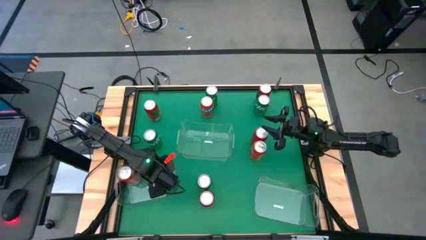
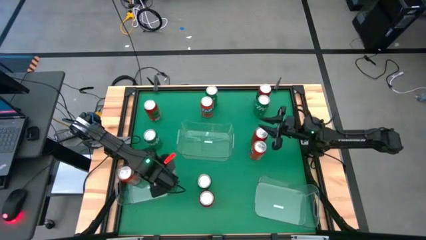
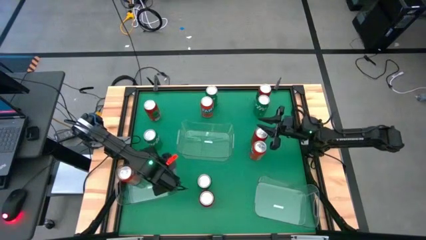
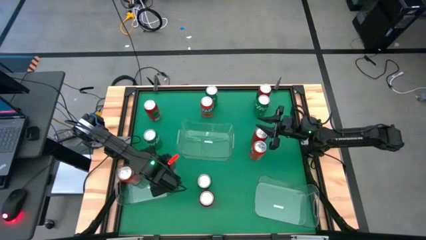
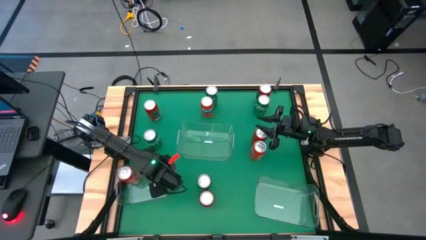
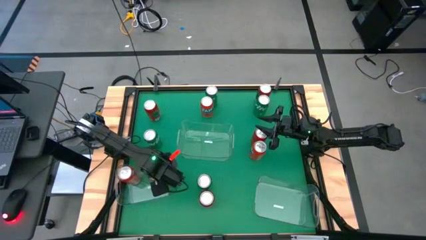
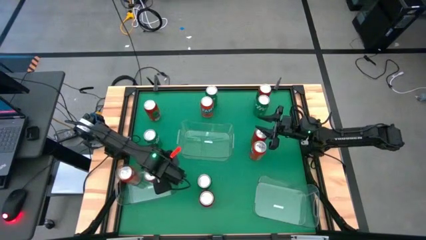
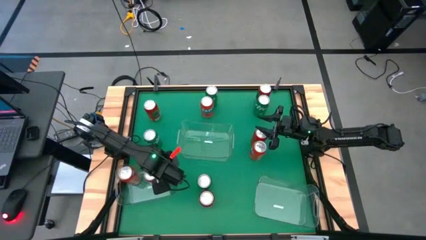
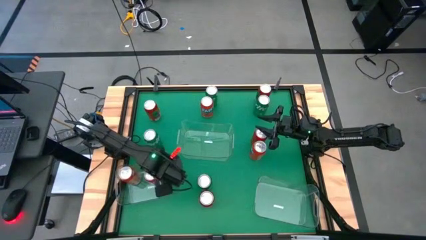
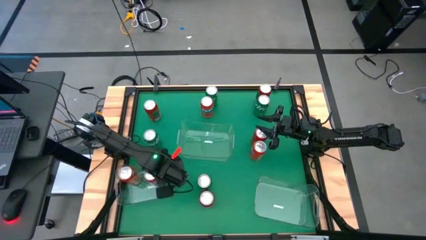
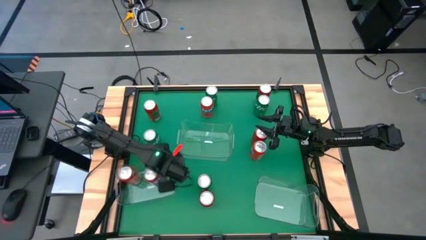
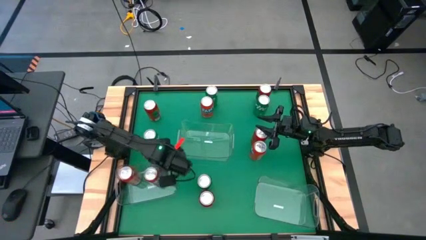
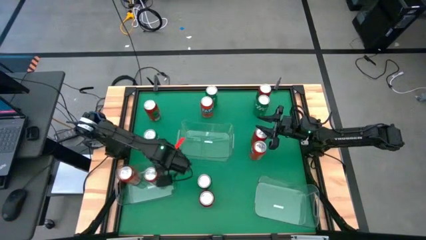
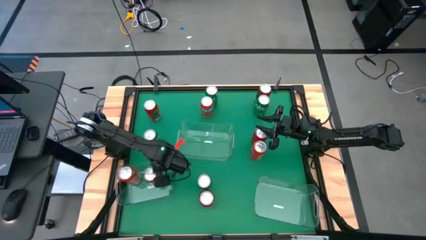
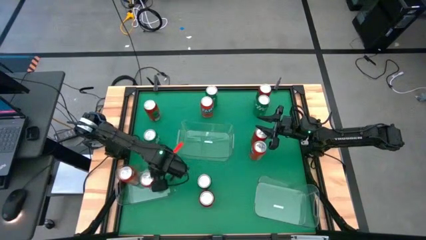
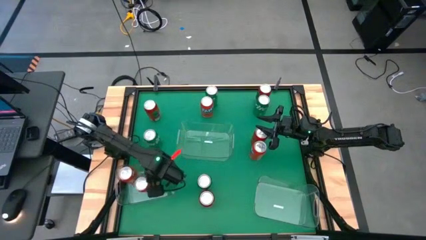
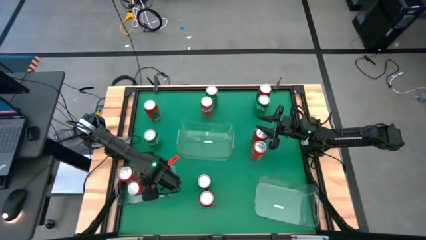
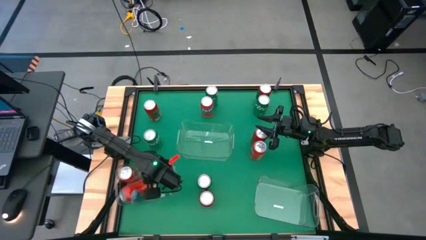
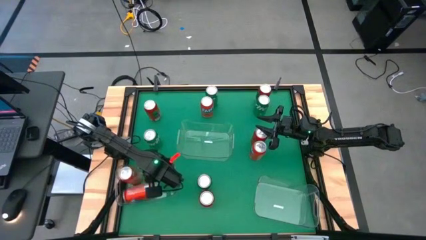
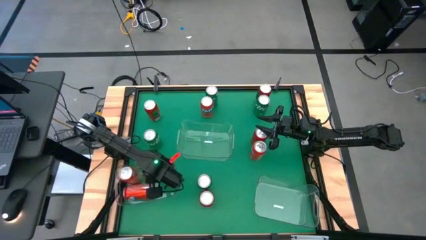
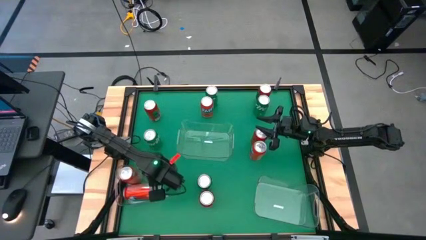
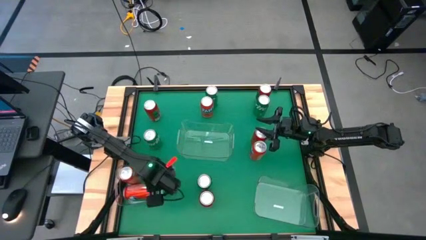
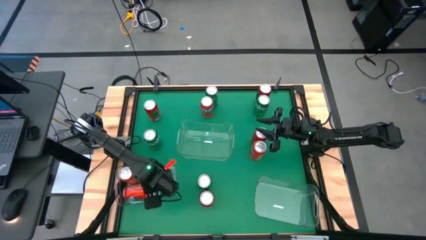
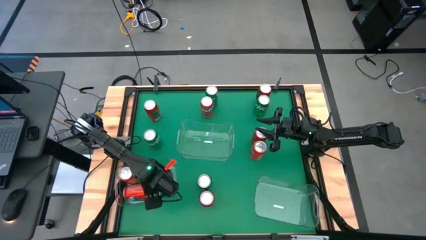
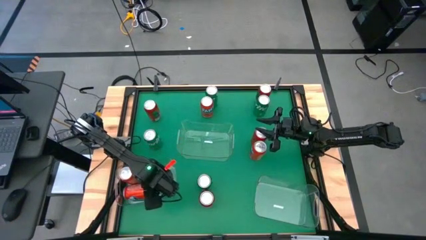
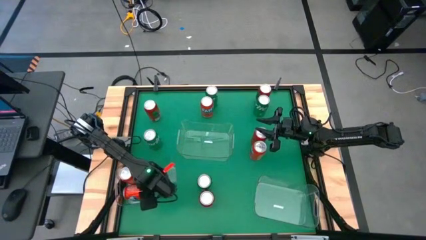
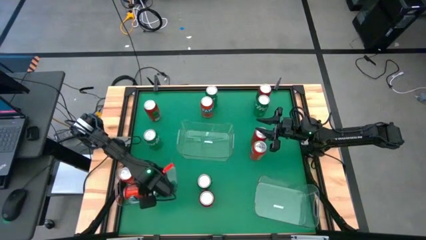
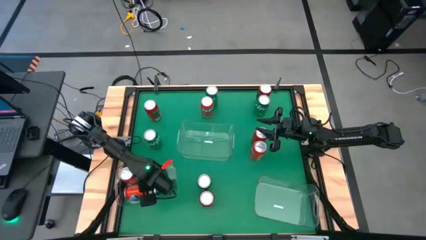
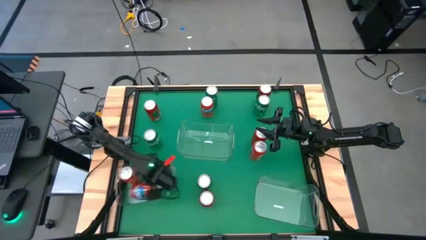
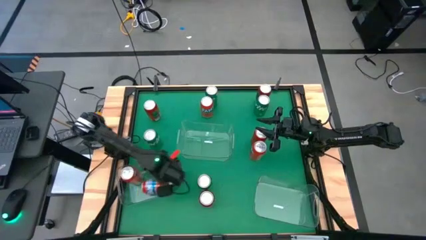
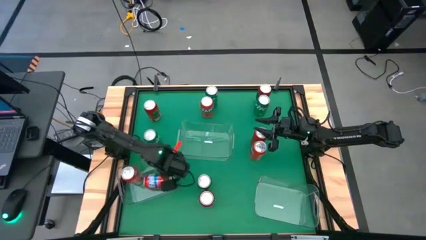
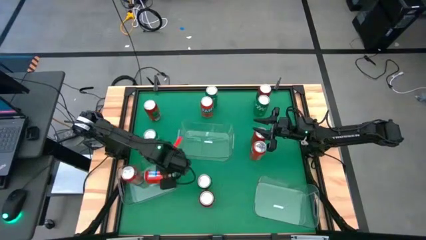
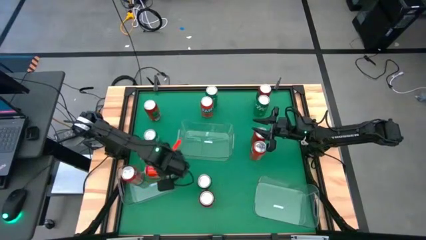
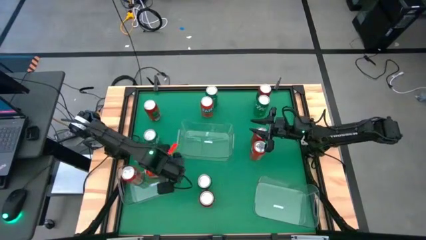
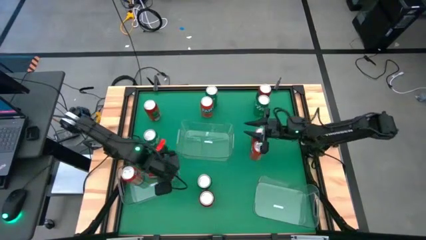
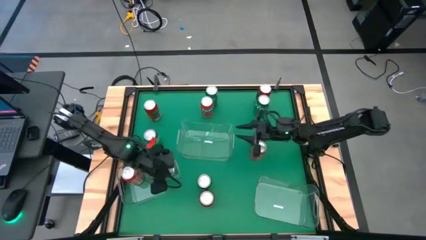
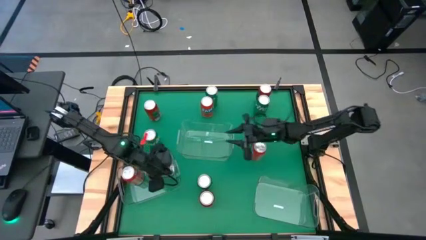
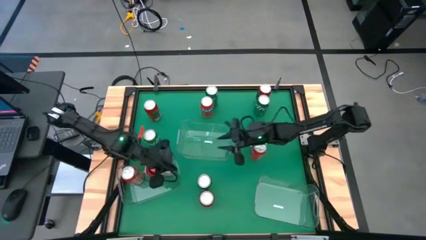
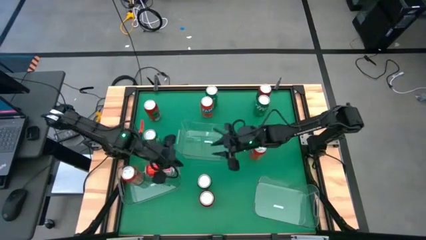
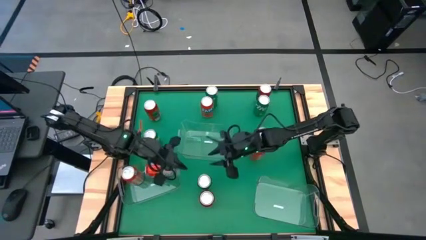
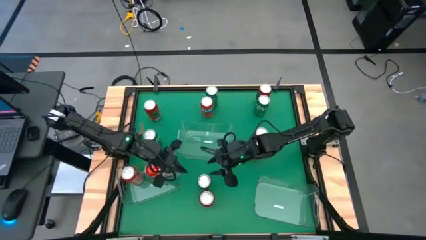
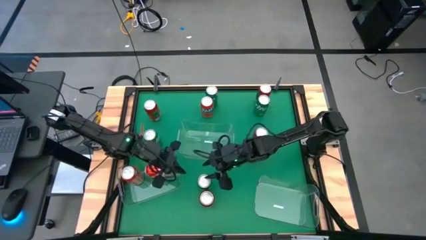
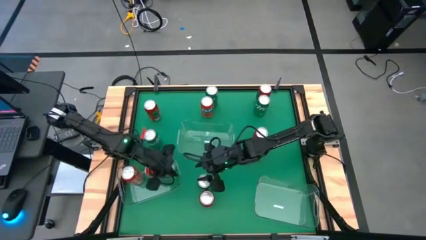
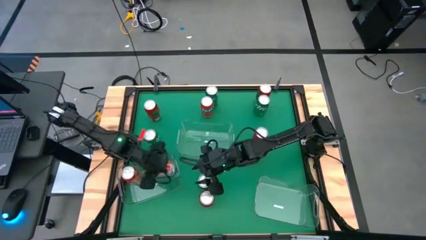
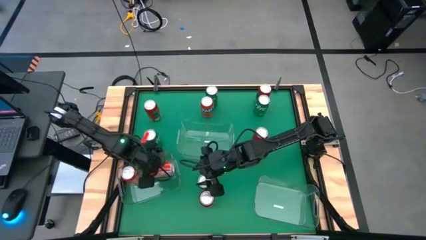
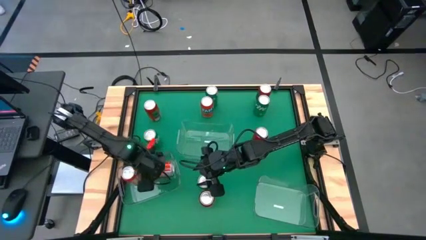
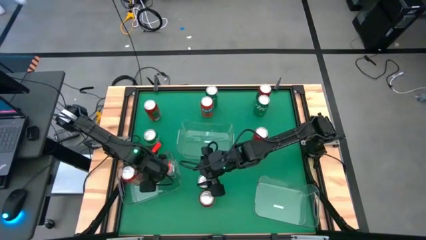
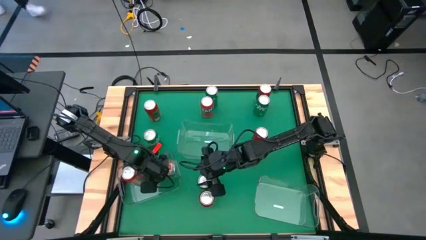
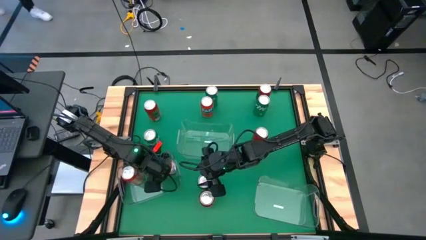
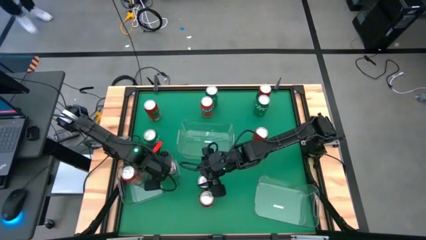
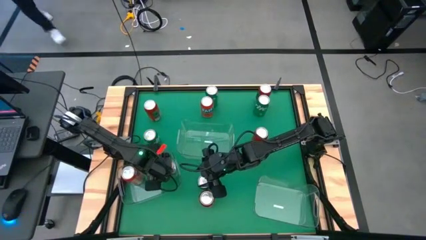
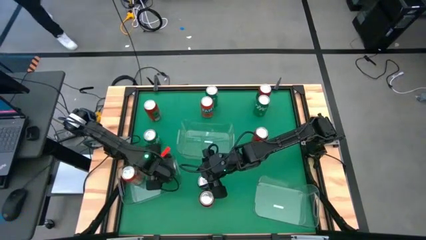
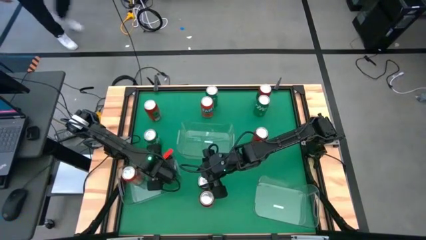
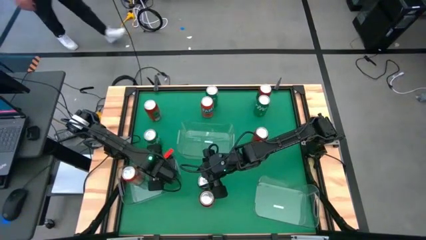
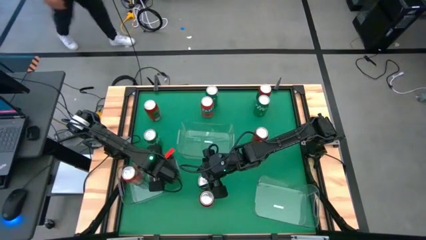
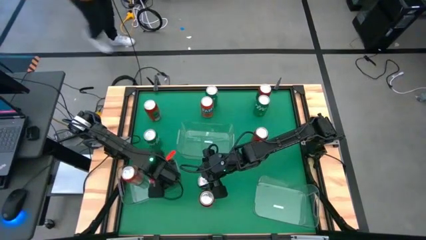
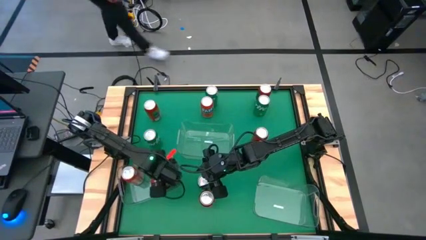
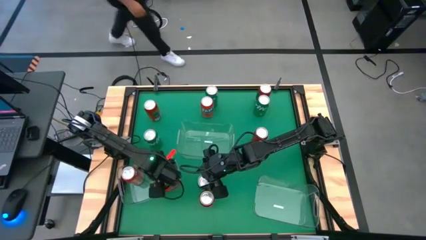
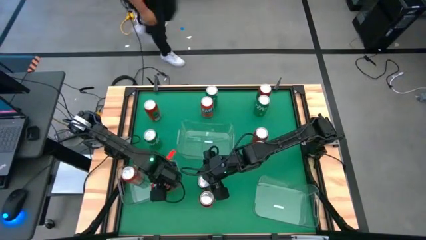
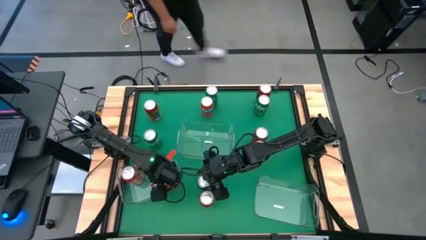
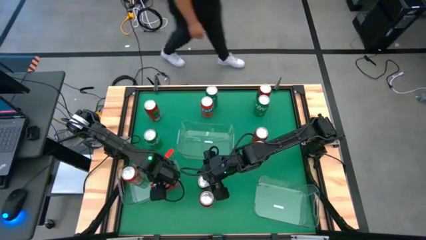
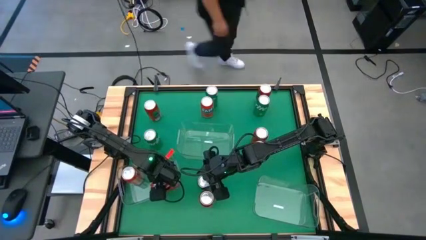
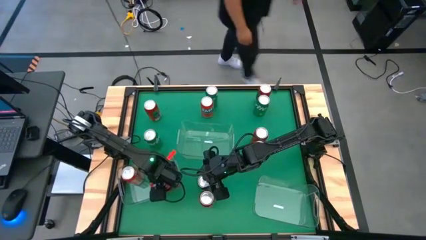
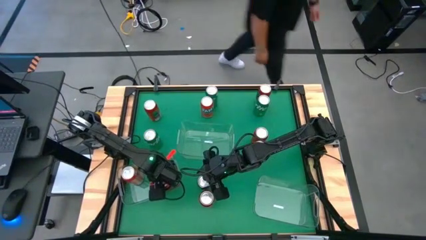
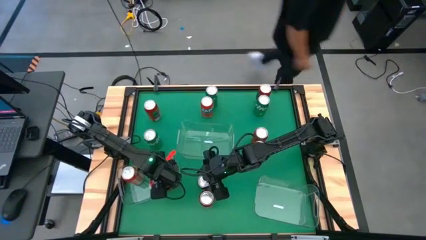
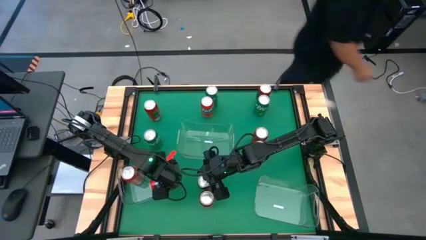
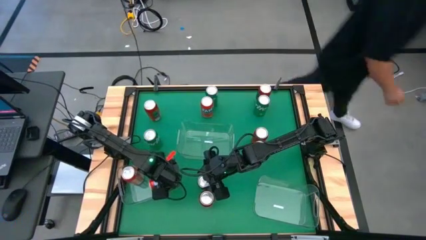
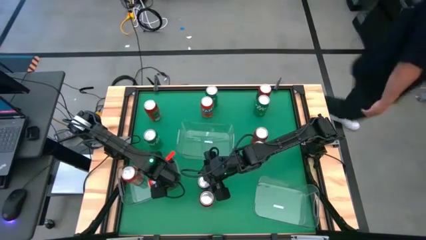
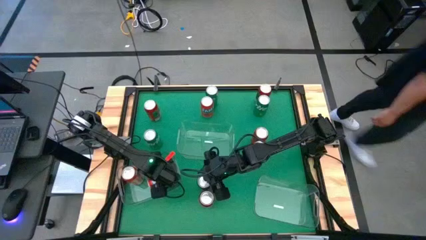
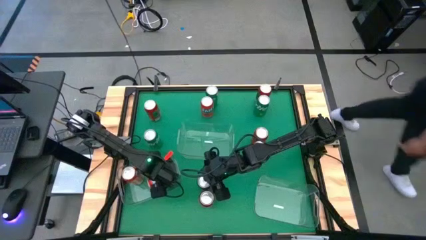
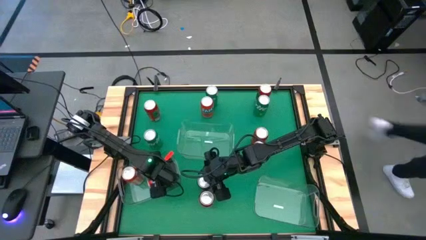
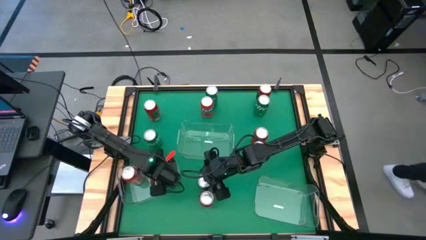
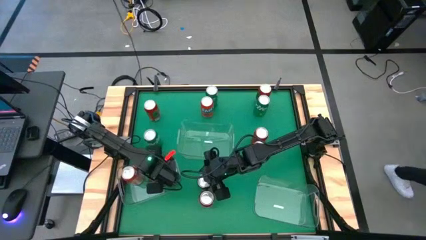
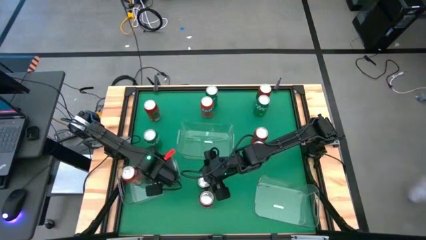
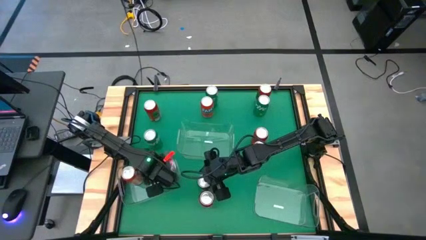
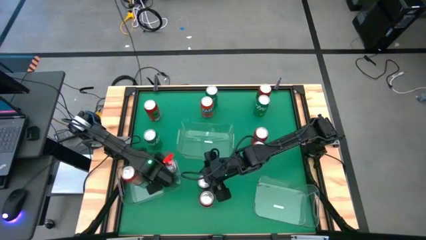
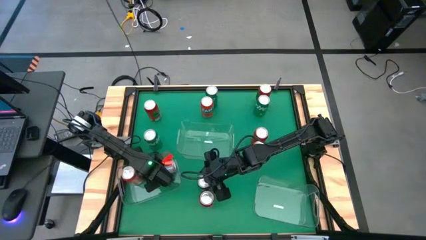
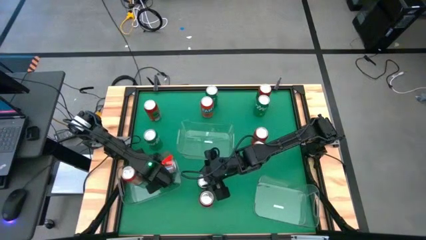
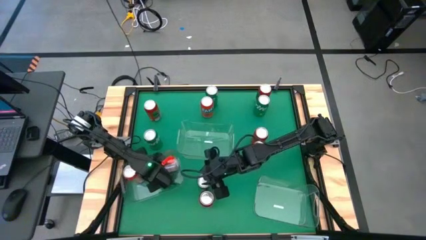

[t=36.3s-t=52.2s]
Task: Sort soda cans
Put the bottom left red soda can into the bottom left transparent bin
